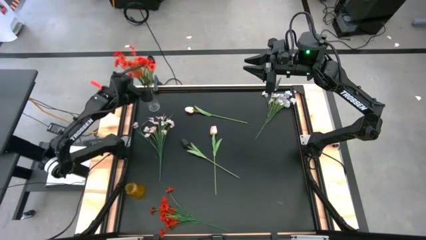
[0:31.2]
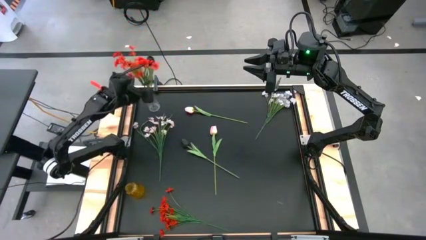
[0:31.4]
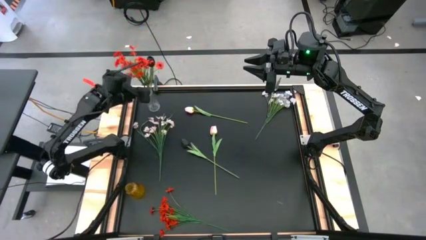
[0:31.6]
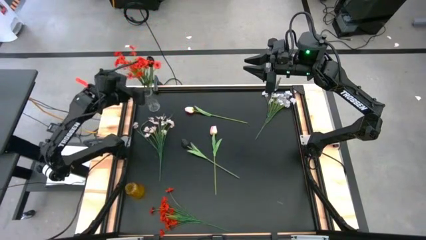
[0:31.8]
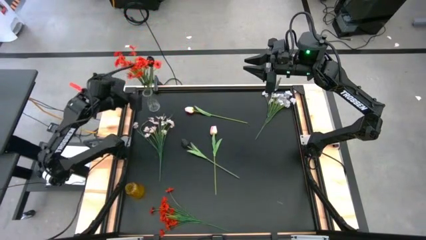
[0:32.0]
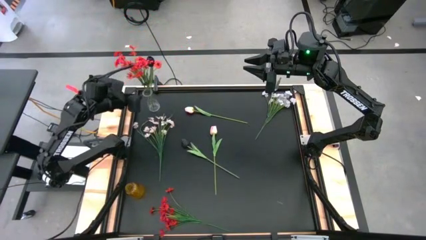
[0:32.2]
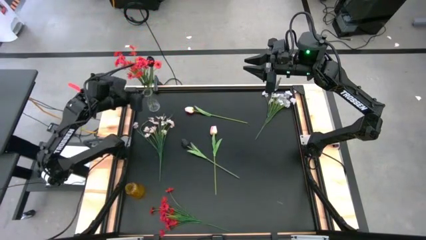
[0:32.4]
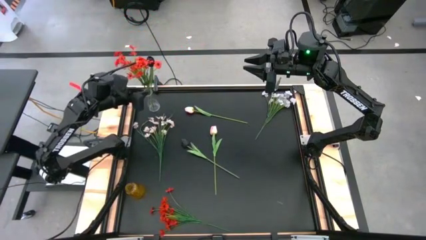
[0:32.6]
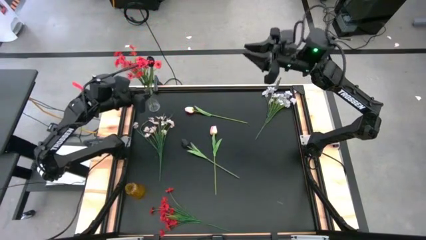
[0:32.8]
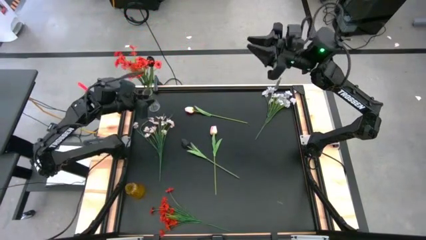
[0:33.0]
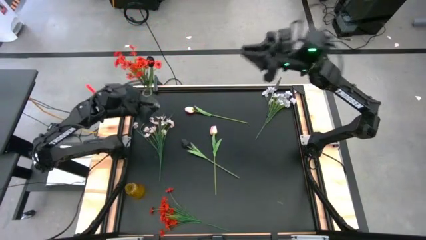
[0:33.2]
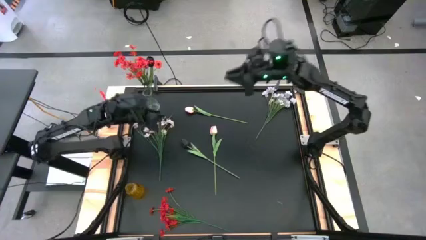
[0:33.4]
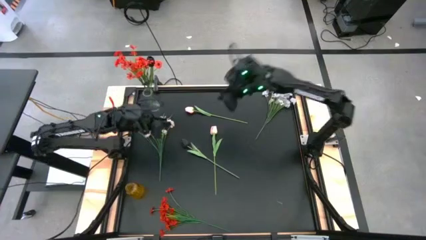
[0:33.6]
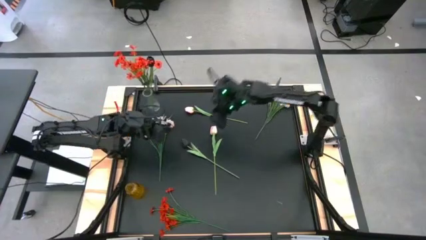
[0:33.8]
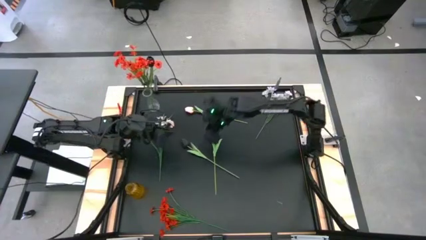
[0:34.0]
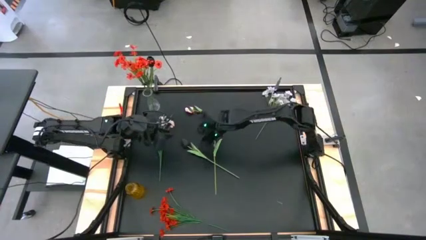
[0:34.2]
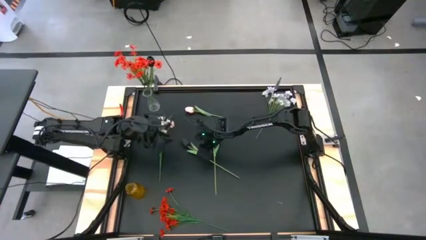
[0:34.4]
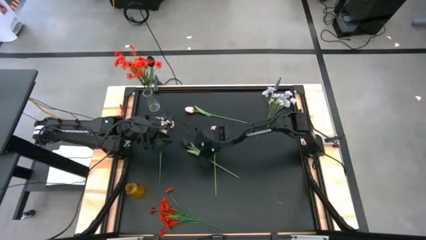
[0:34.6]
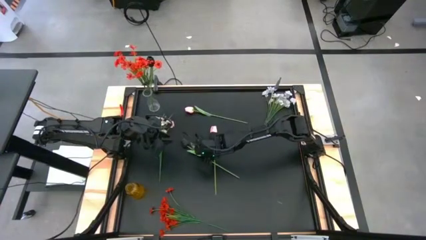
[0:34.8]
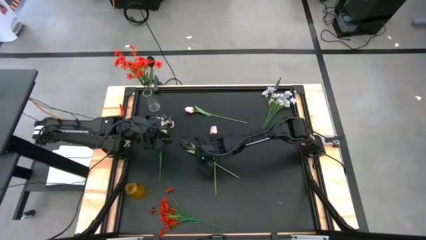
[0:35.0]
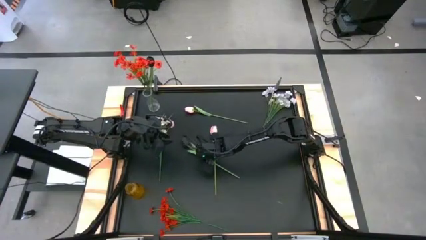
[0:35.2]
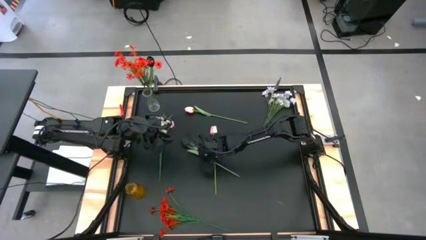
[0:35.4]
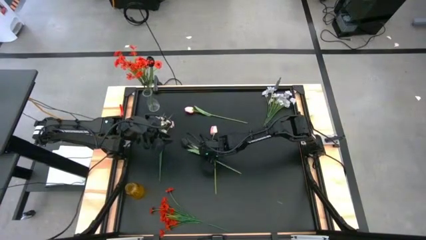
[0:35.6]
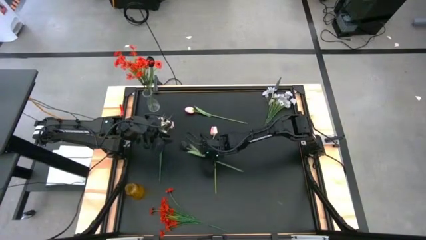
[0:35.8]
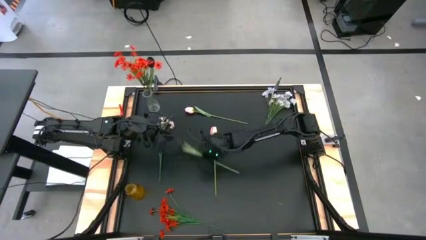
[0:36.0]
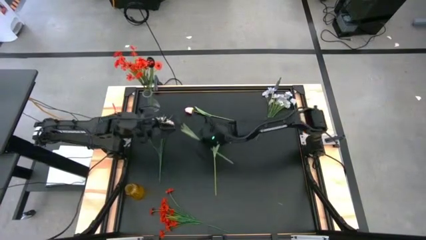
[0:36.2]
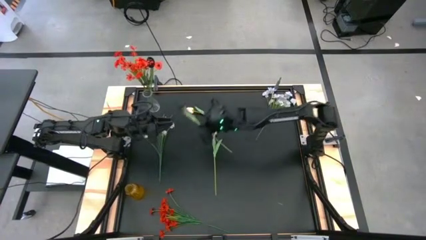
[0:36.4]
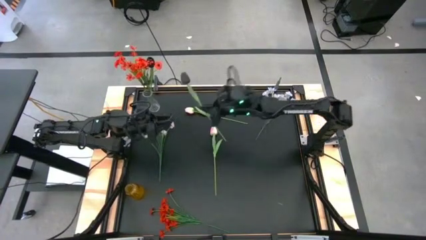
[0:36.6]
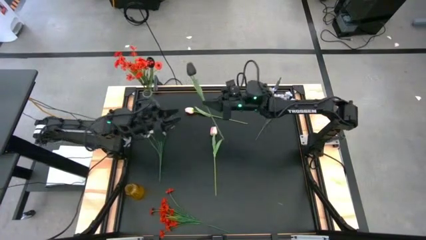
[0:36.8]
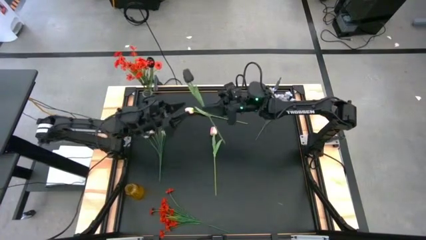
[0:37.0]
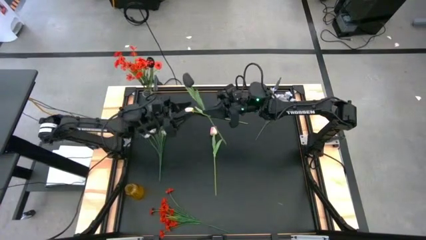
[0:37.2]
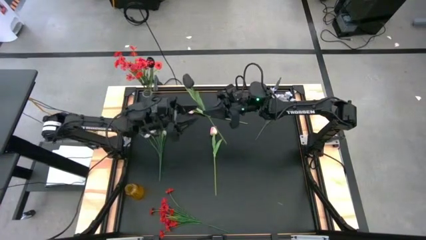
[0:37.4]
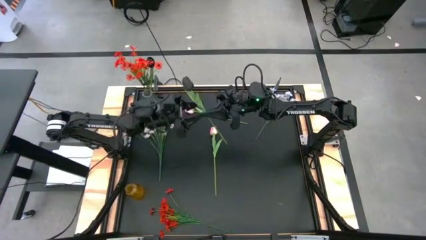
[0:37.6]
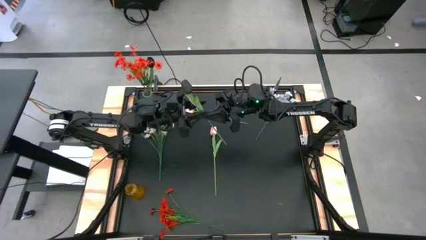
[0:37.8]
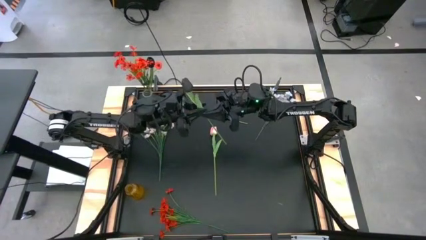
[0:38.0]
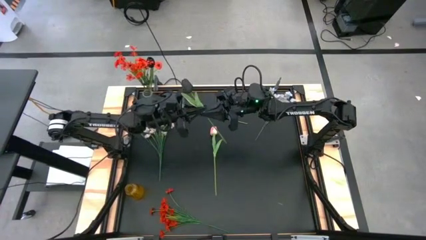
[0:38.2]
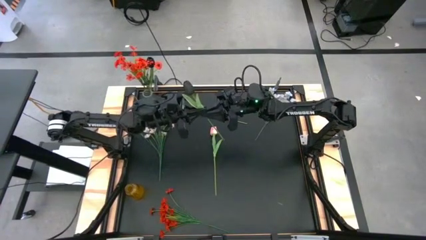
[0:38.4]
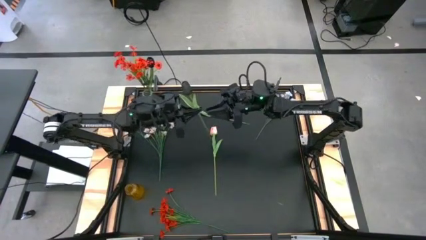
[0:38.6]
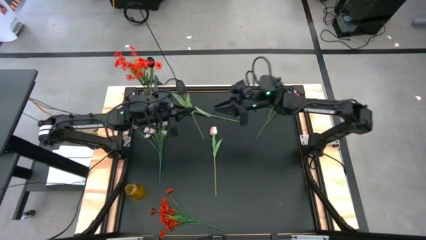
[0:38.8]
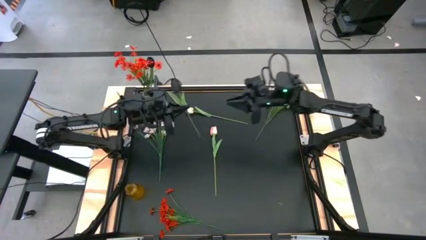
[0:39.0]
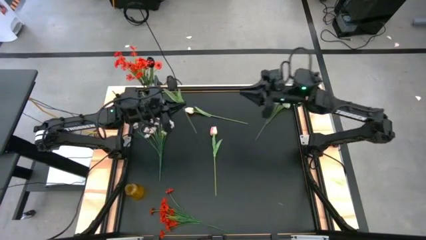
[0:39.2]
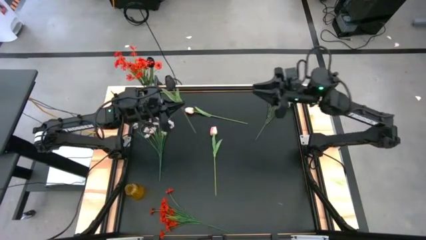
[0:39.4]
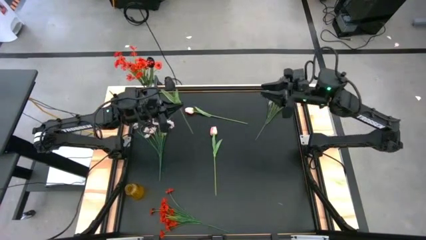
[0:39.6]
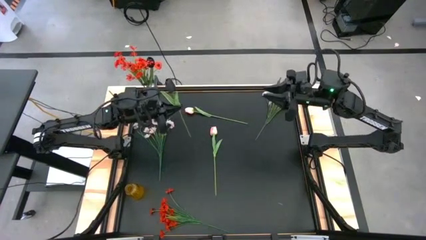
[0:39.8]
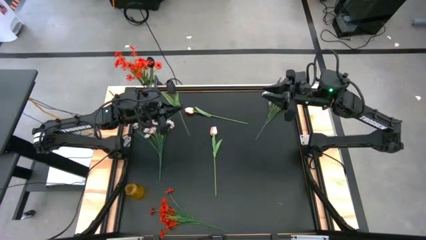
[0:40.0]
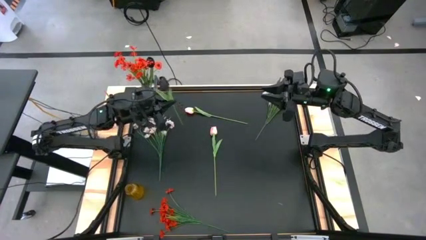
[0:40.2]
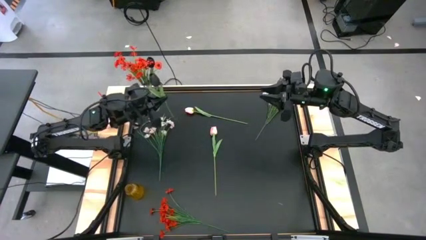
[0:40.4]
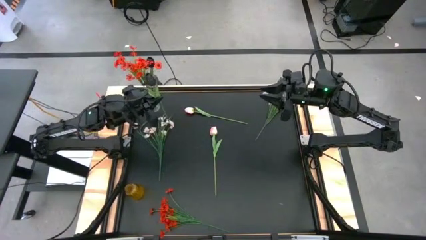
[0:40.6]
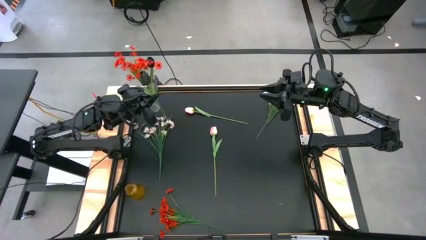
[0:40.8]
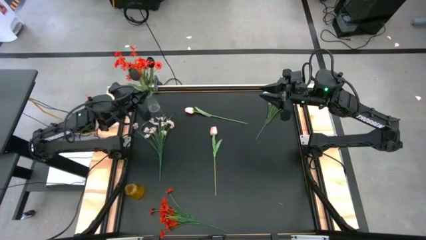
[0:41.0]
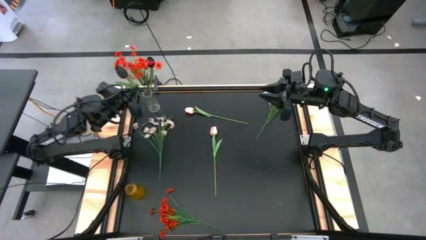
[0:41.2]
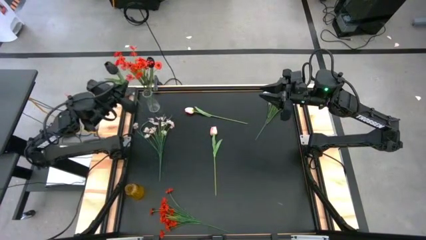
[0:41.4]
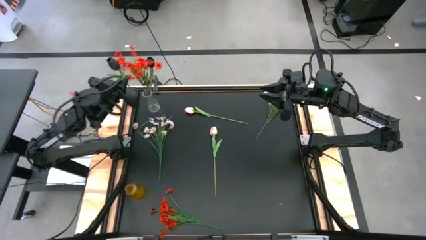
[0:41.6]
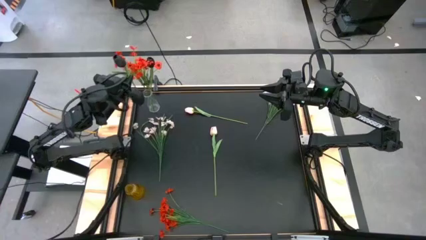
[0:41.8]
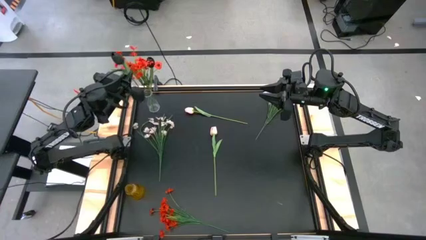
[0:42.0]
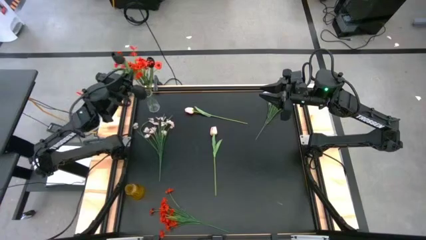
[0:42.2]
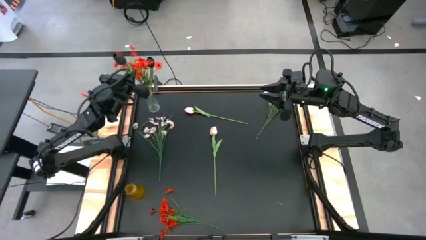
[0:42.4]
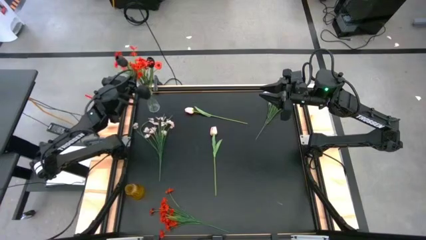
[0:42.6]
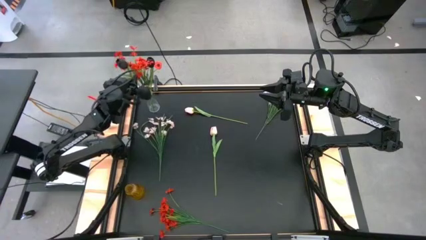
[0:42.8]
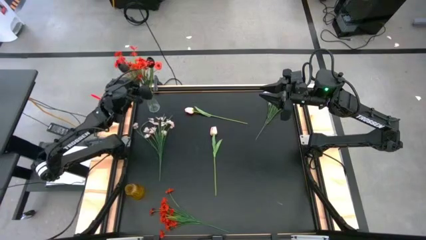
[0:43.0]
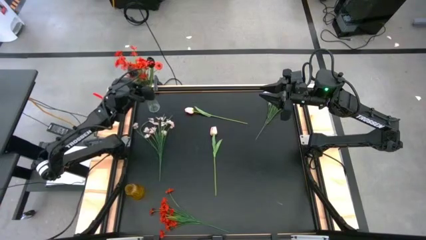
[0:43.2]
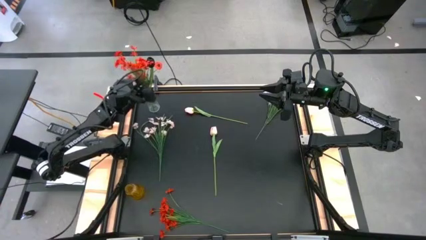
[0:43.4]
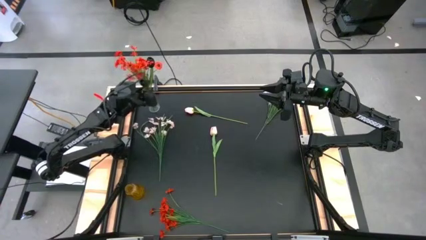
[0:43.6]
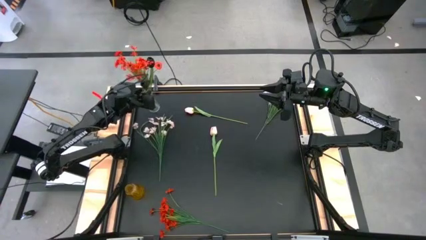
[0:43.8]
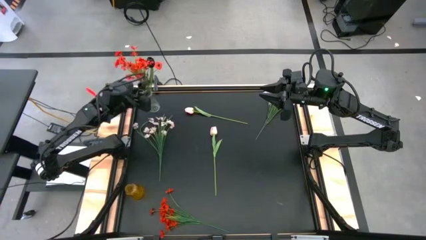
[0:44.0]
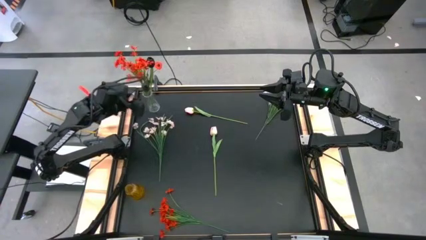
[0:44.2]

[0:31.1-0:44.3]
Task: Sort flowers into vase by color
Put the black flower into the transparent vase

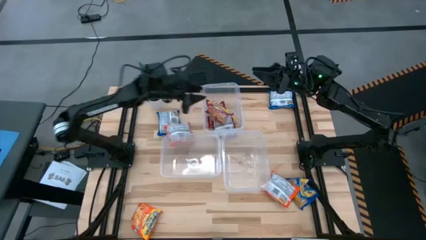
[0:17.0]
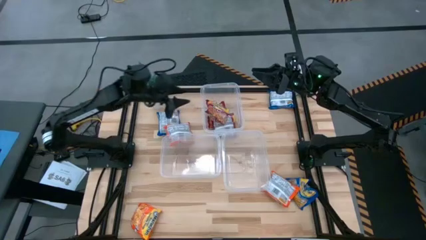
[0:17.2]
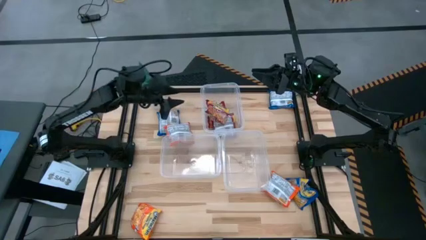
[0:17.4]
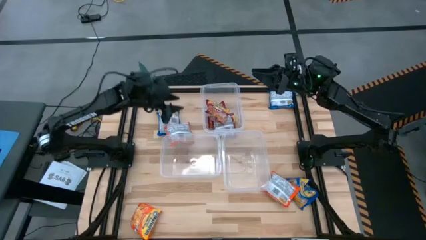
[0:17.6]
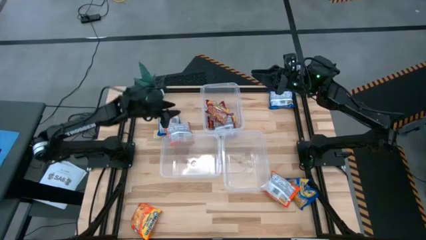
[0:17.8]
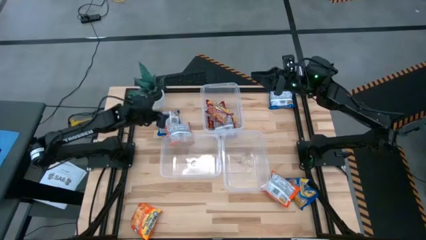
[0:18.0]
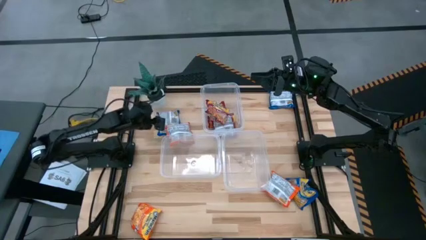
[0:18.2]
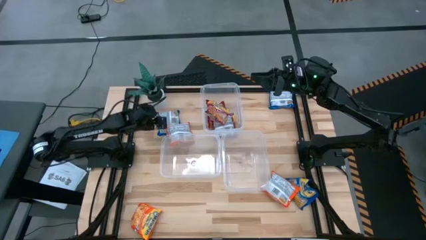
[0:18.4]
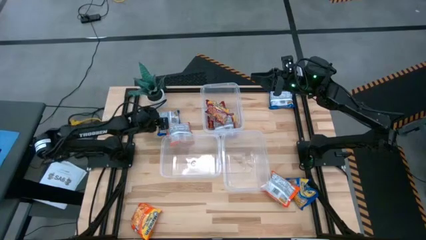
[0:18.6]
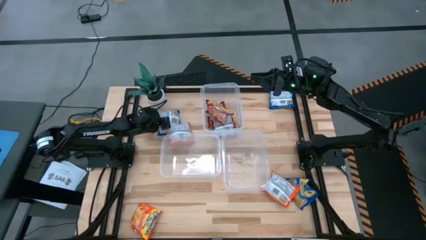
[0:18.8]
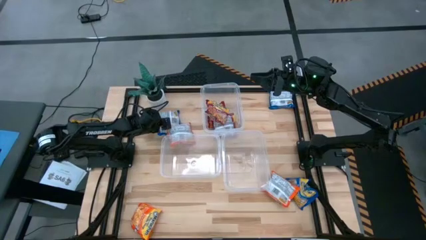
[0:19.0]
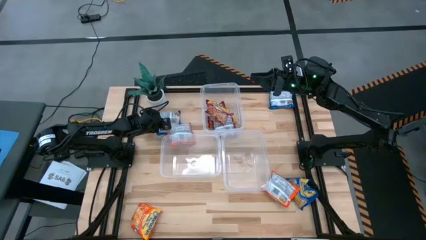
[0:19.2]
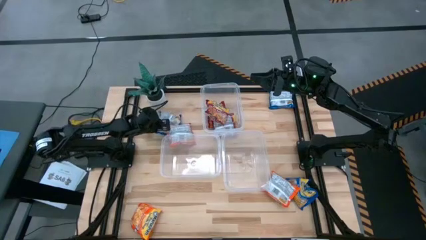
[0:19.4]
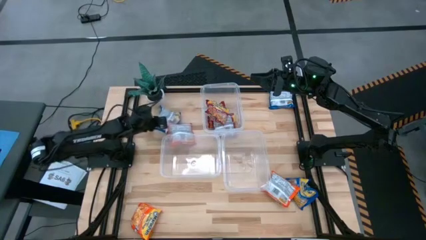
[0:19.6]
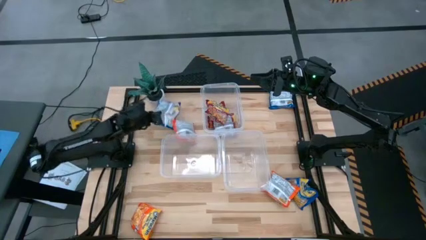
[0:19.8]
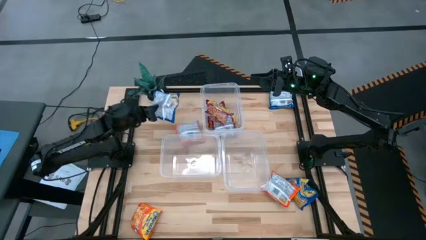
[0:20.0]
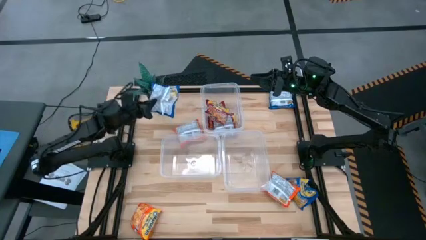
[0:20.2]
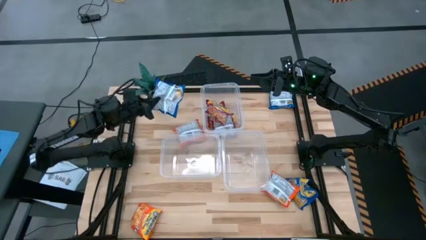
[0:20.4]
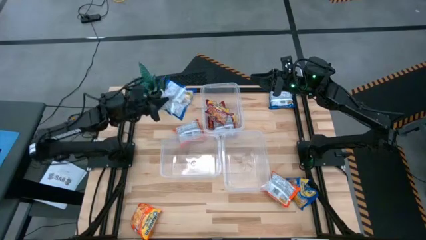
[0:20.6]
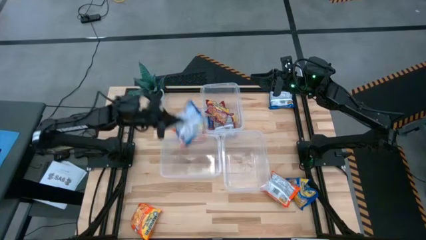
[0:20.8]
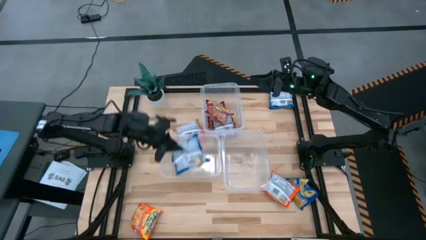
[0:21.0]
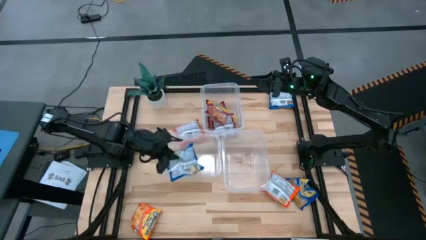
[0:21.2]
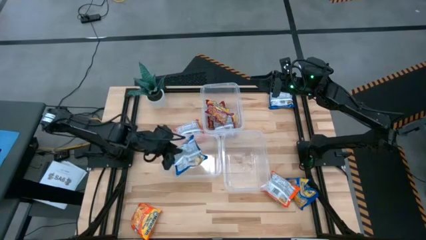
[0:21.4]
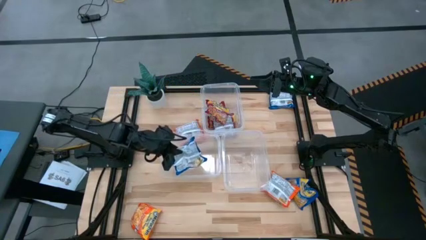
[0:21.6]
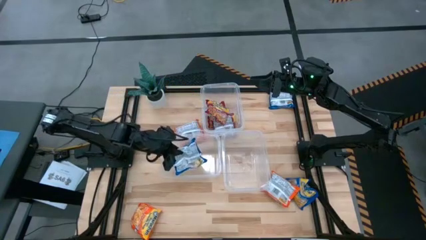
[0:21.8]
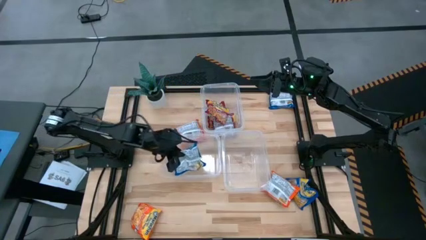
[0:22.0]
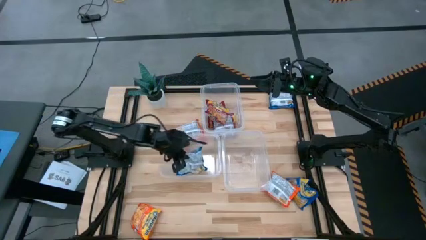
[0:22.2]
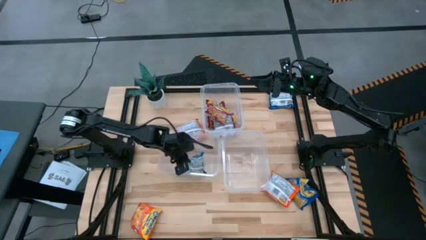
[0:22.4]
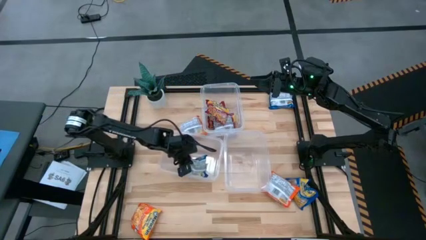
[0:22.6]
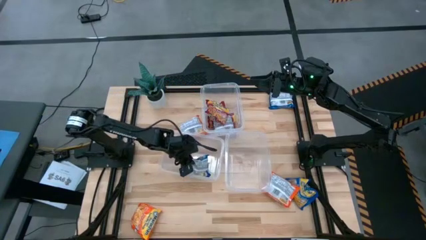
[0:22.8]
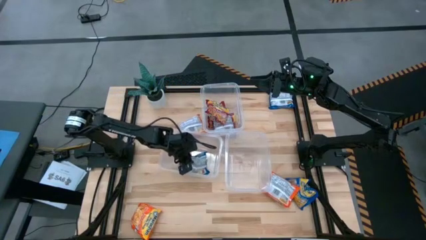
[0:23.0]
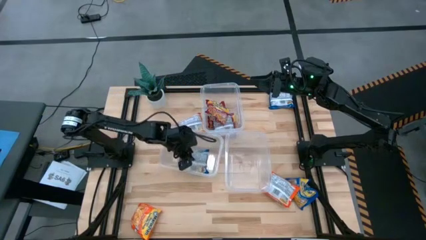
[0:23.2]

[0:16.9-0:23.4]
Task: Sort Maruchan noodles
Put the top left blue noodle pack into the bottom left transparent bin
